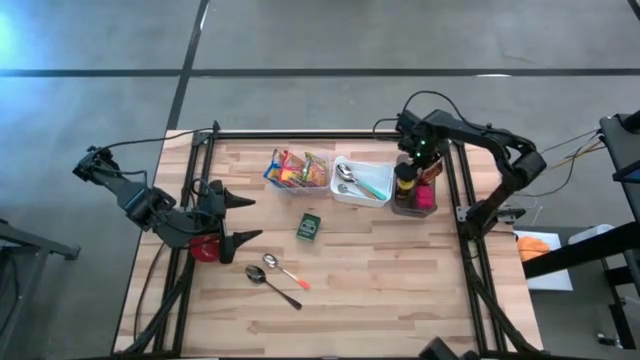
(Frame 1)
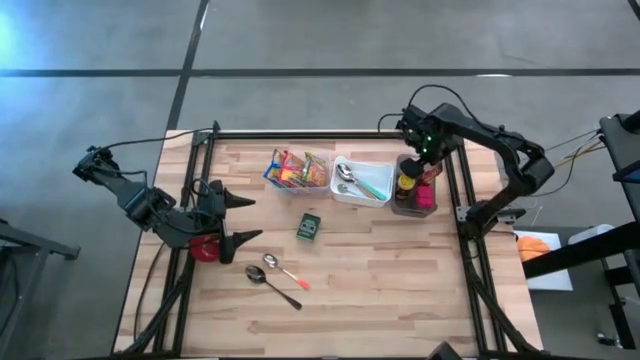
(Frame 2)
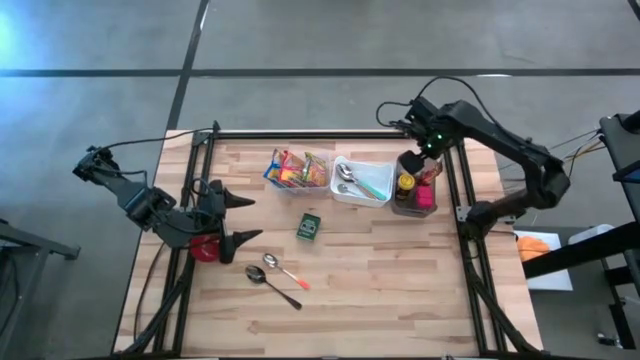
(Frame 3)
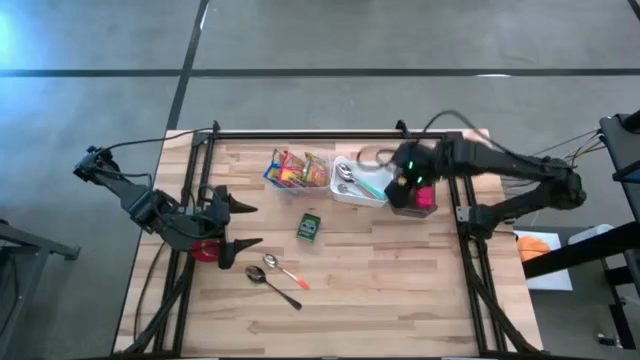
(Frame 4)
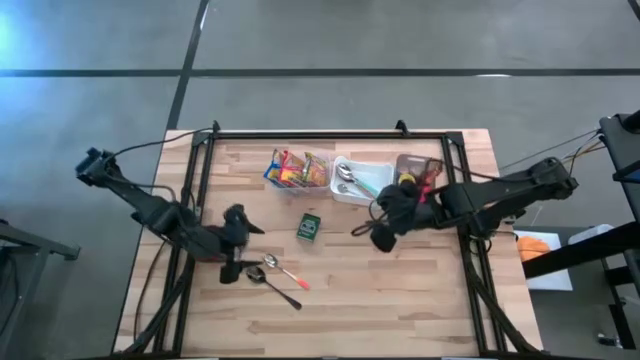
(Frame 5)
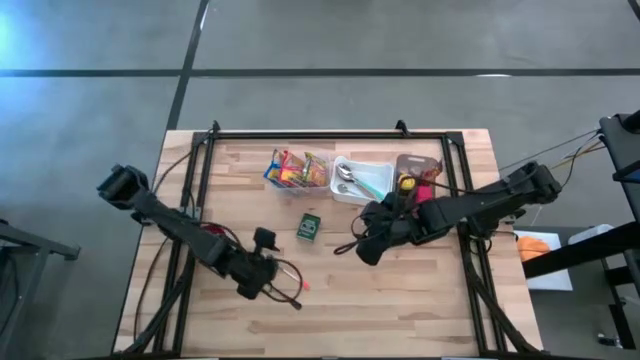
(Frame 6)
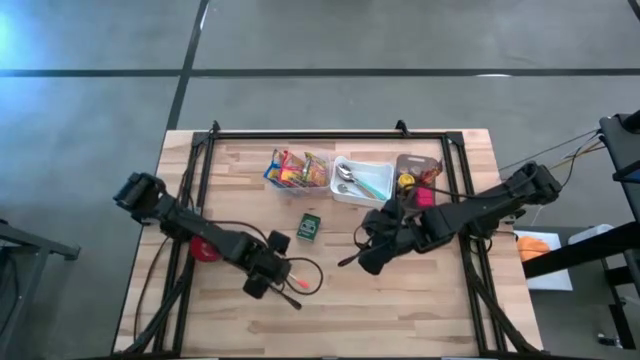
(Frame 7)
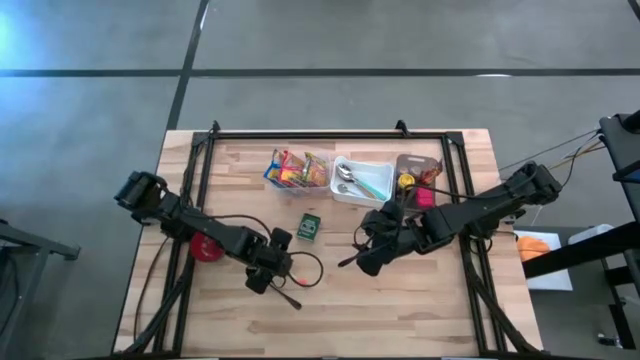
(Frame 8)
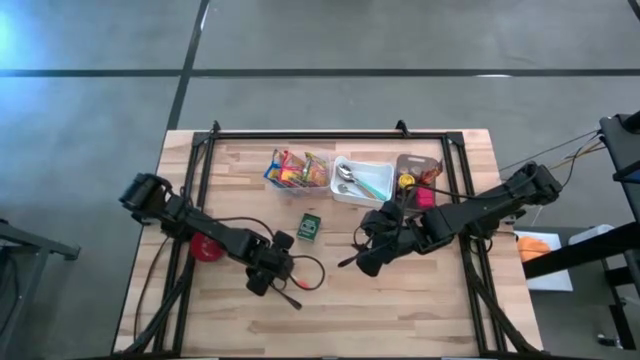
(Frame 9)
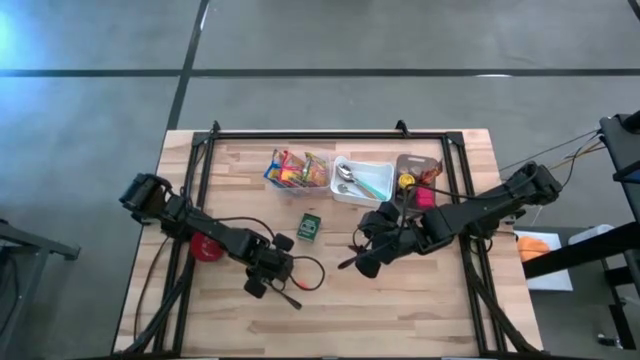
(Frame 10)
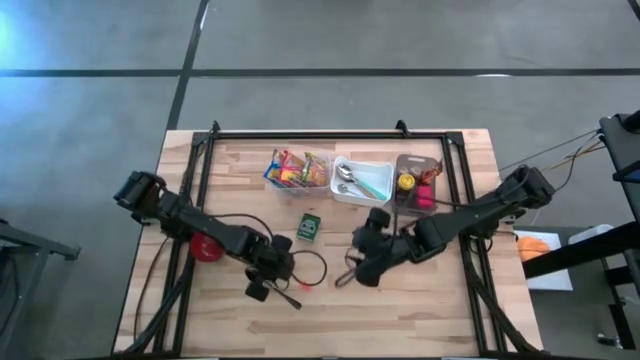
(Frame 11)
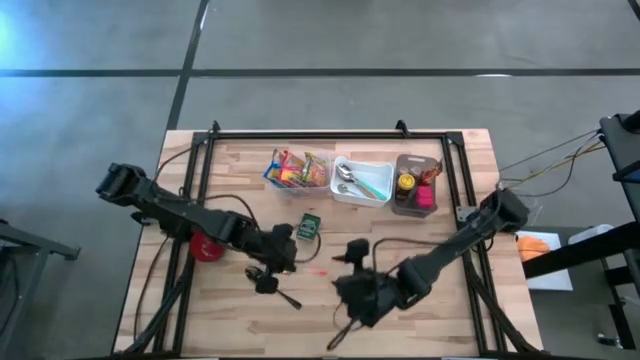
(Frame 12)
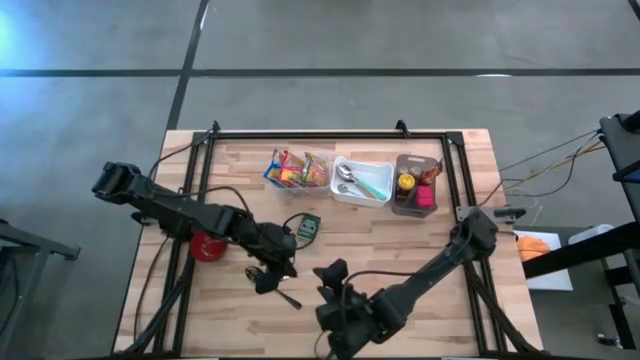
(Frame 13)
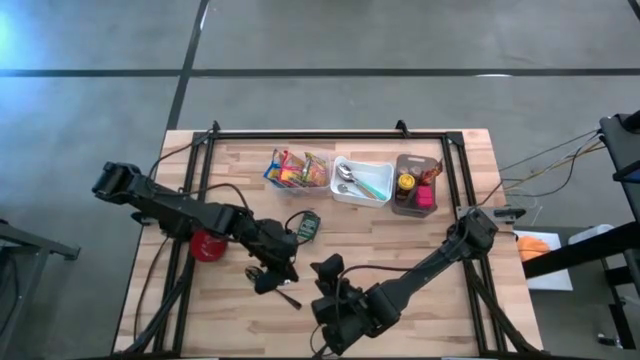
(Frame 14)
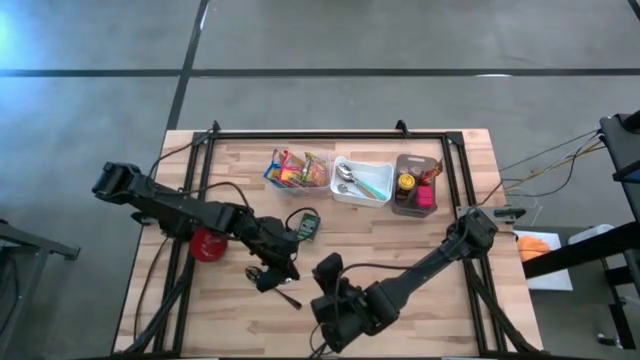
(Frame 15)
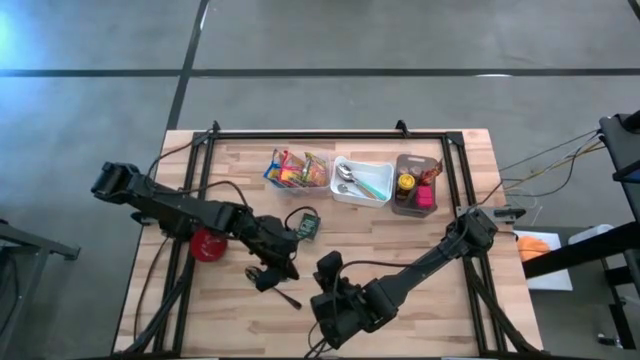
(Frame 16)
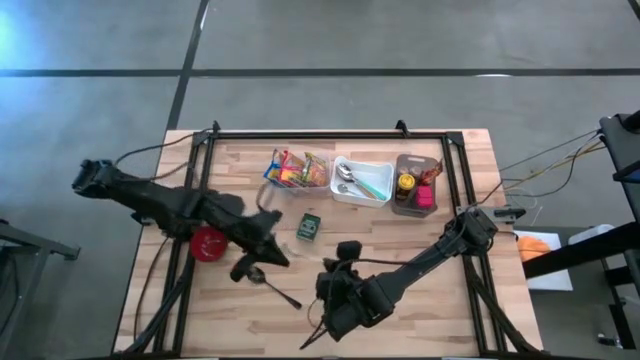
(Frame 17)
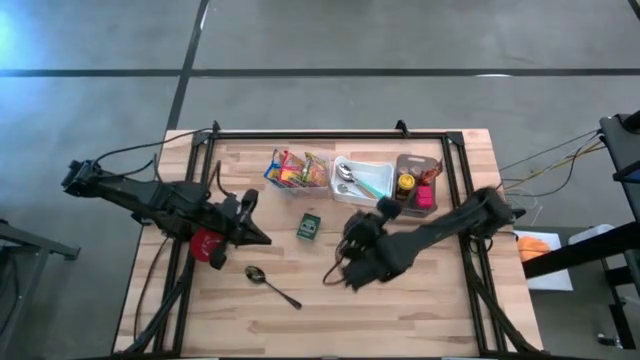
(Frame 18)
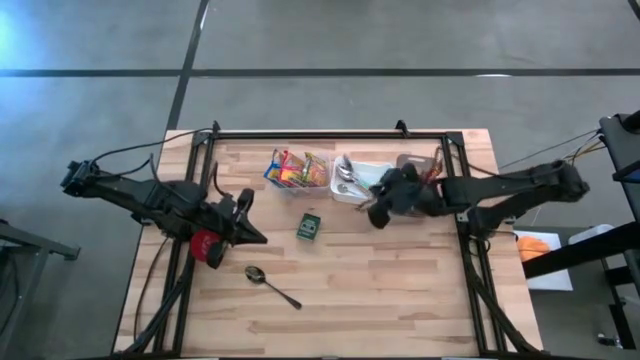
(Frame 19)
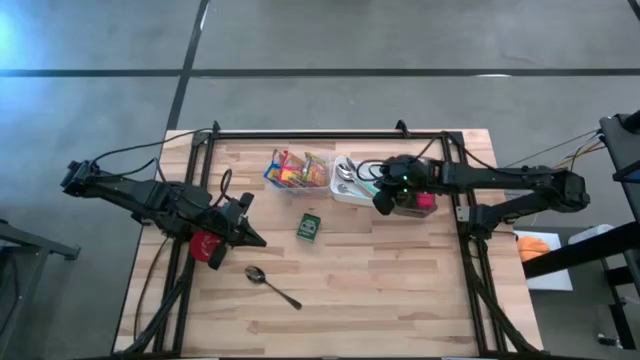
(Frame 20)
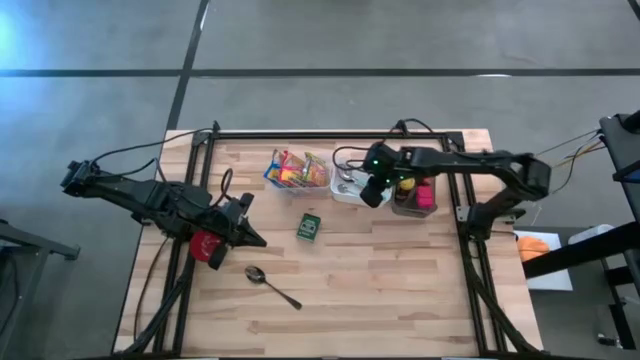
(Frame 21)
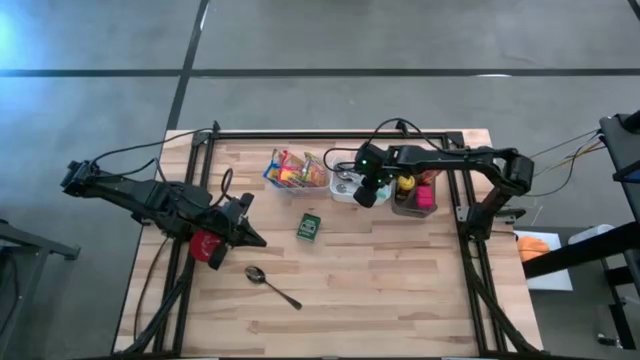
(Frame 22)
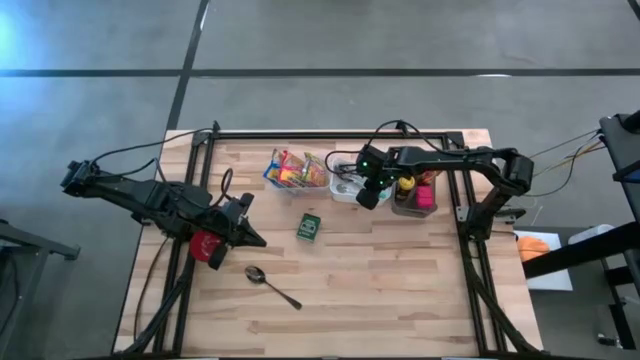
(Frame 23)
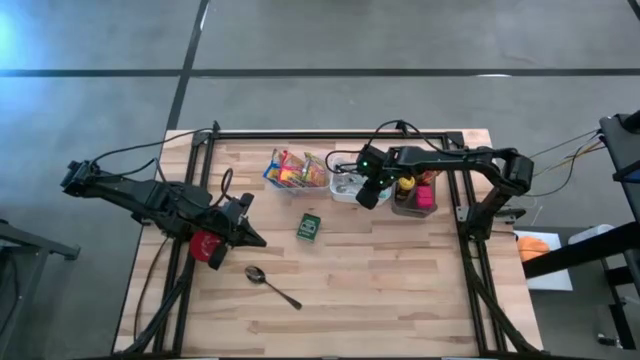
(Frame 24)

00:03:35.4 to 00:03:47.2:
Put the orange and white spoon into the white bin

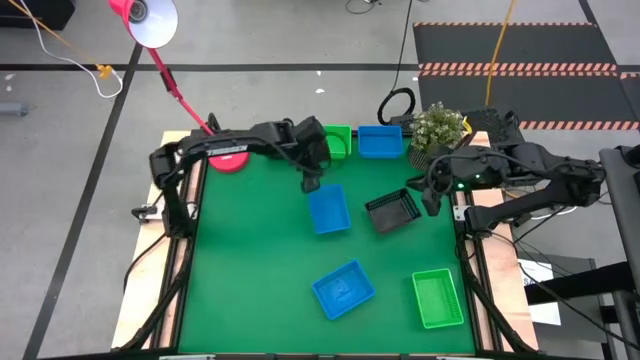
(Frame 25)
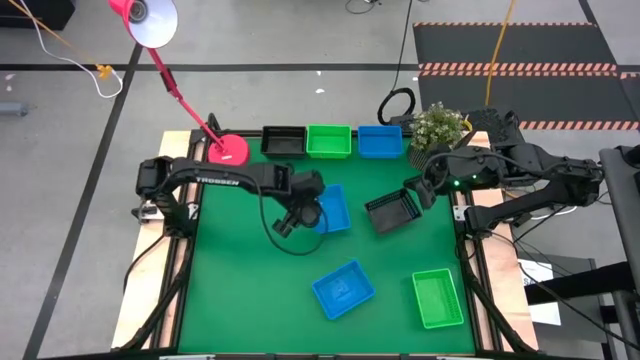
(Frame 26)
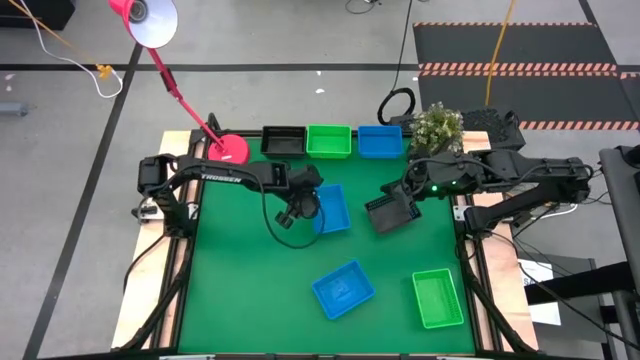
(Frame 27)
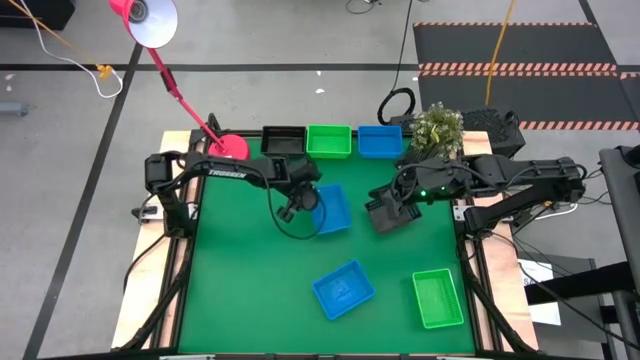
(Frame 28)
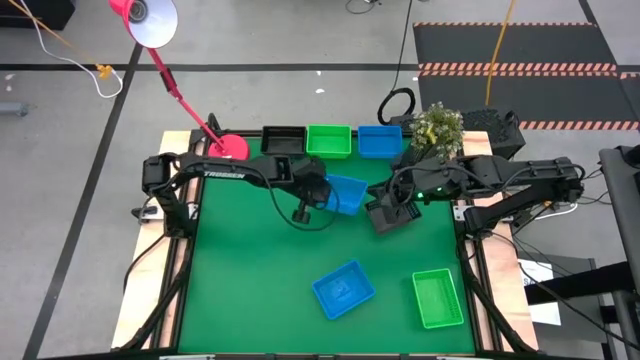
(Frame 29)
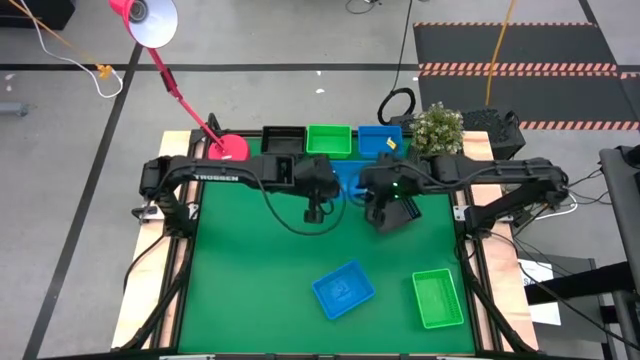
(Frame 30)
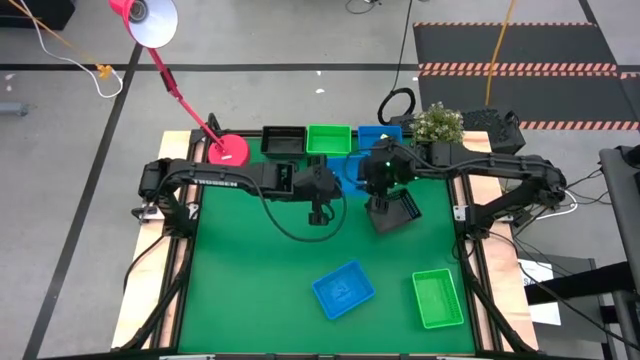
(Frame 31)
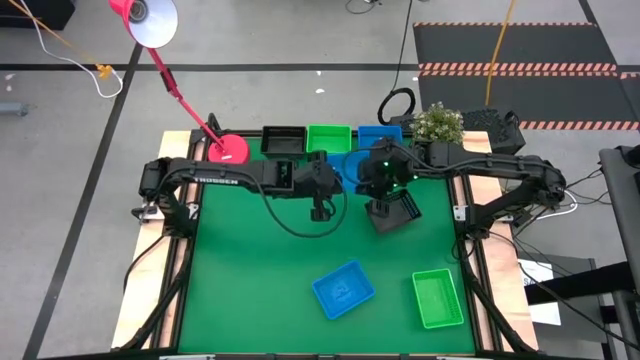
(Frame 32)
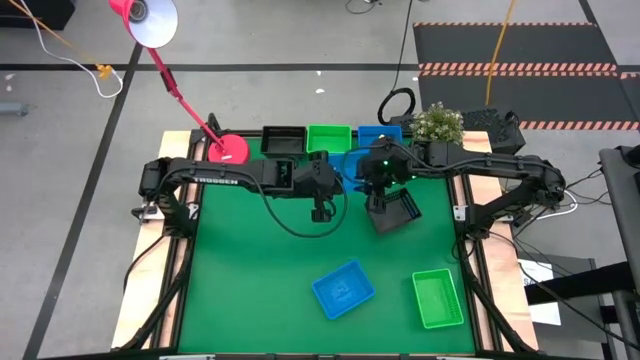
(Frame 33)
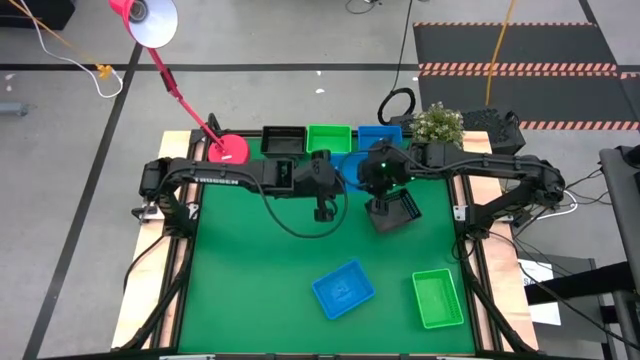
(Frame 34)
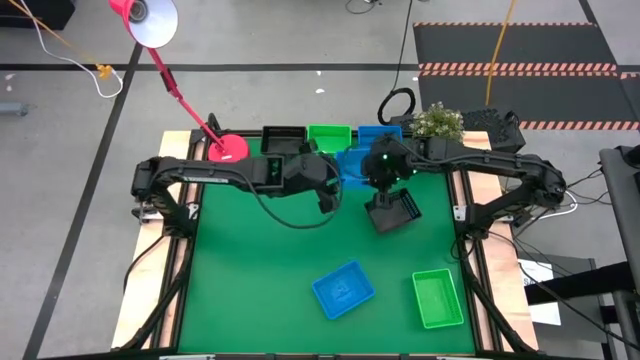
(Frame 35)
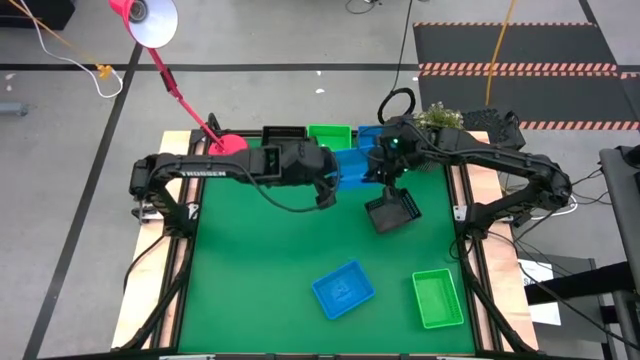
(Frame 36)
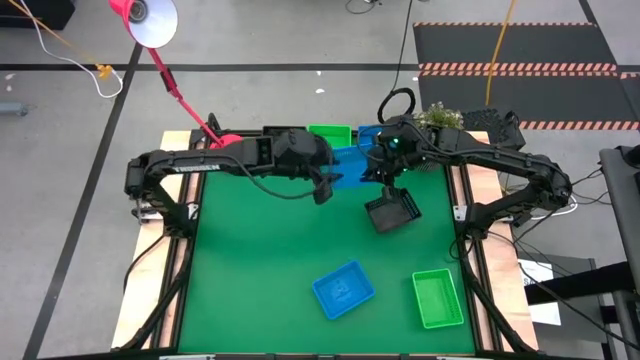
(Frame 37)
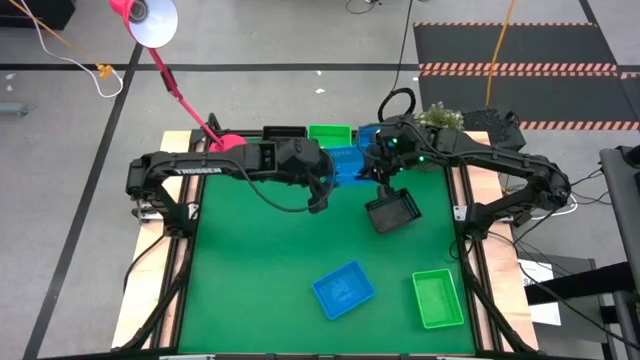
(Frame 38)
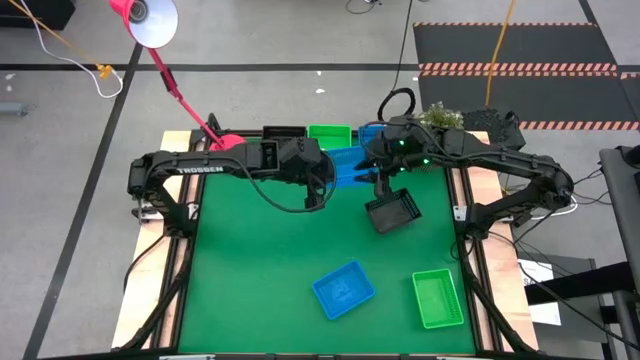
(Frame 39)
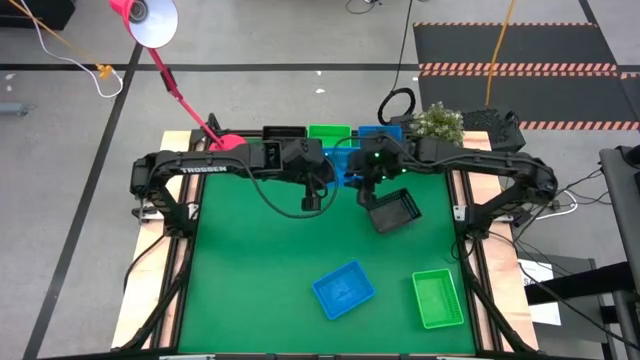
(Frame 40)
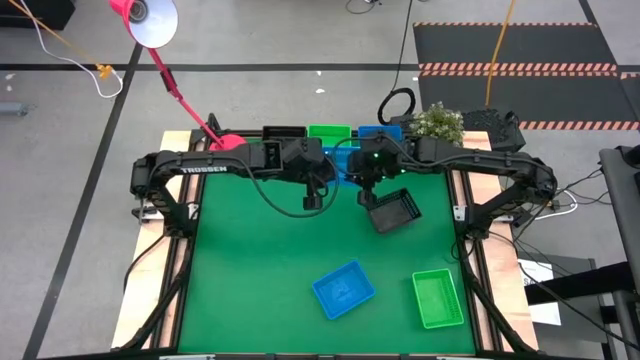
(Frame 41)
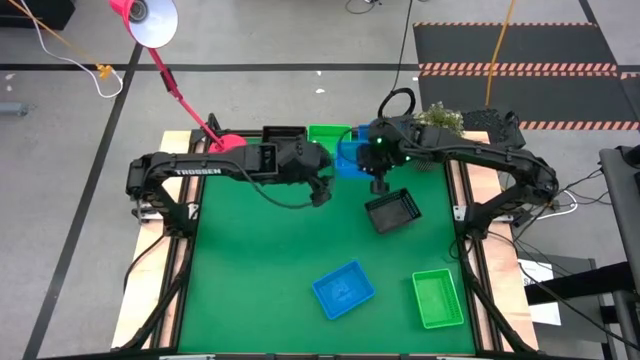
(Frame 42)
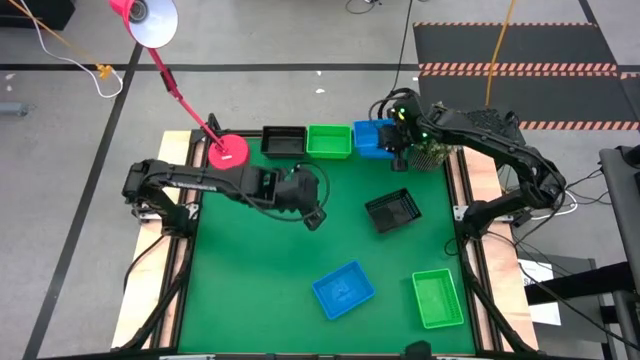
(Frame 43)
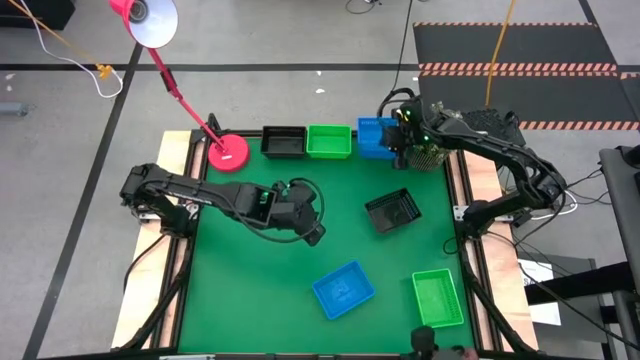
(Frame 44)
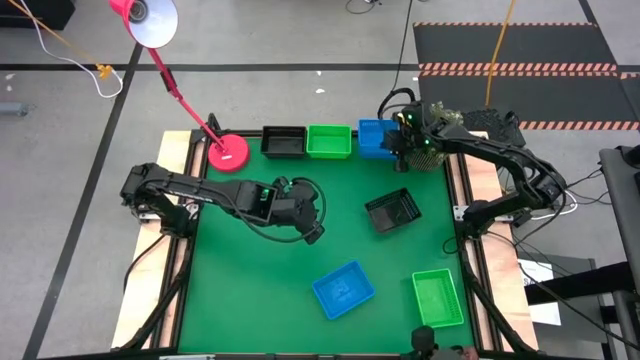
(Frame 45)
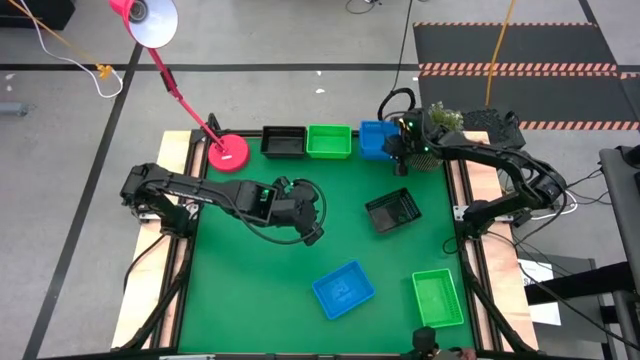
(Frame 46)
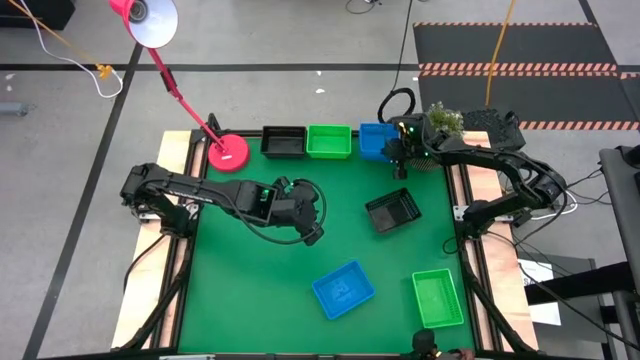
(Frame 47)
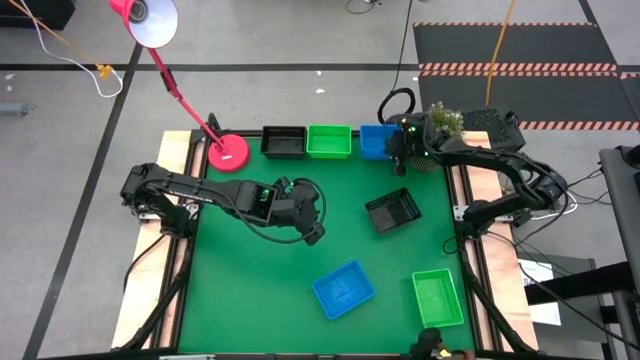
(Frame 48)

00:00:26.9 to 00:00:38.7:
Stack the middle blue bin into the top blue bin
